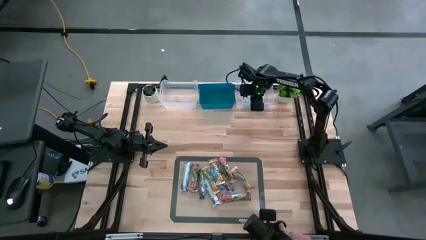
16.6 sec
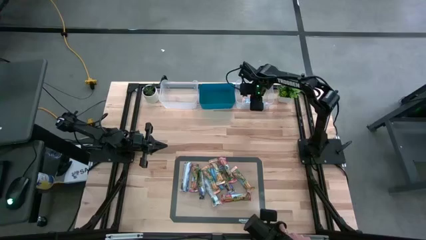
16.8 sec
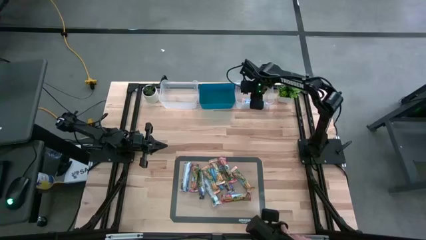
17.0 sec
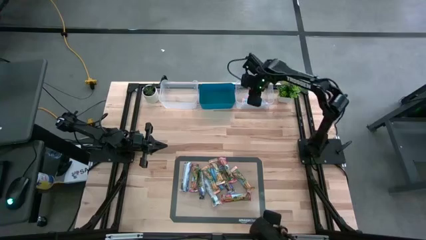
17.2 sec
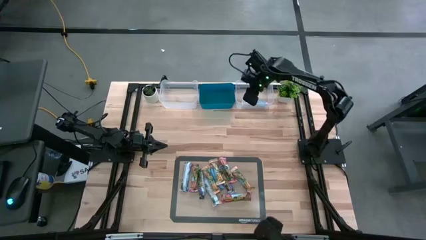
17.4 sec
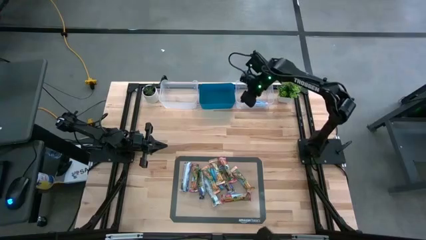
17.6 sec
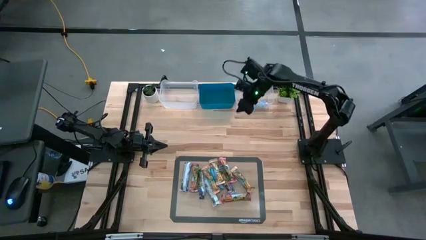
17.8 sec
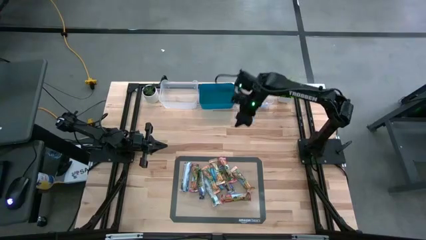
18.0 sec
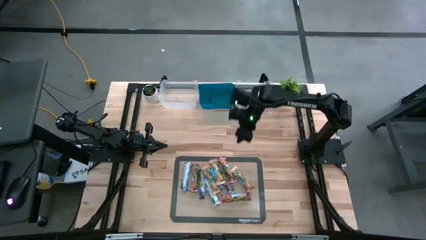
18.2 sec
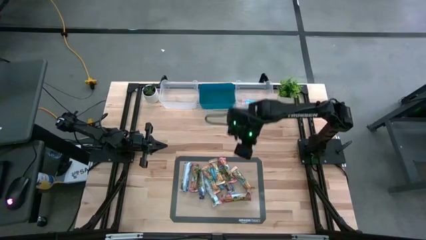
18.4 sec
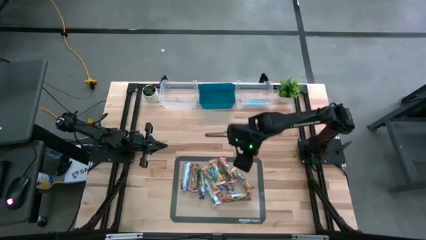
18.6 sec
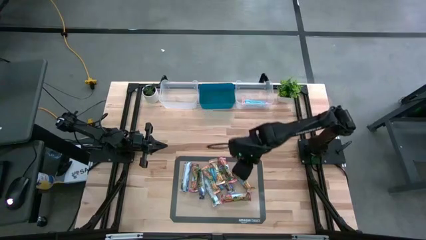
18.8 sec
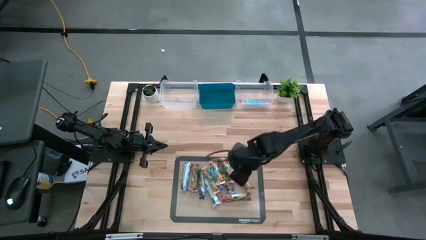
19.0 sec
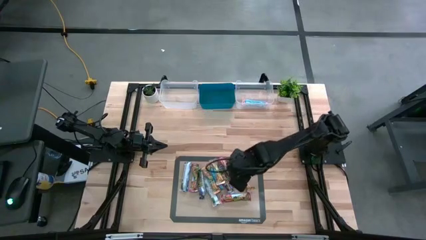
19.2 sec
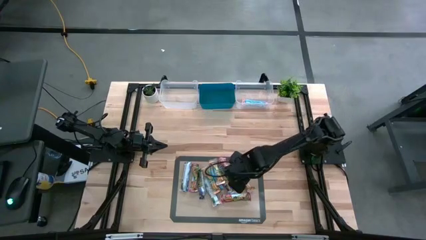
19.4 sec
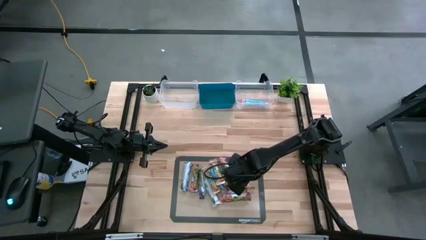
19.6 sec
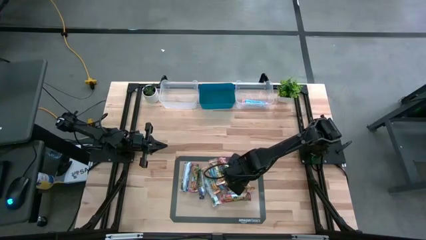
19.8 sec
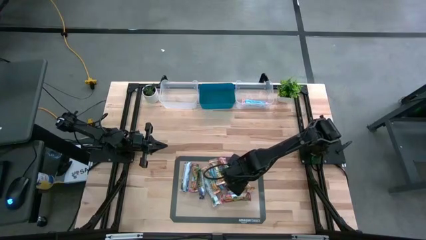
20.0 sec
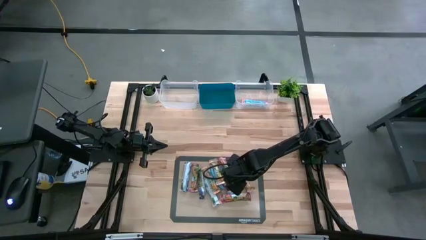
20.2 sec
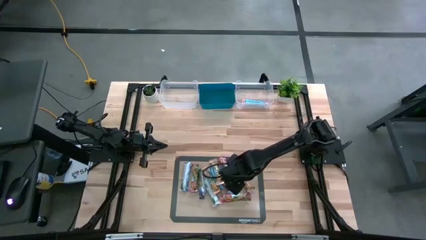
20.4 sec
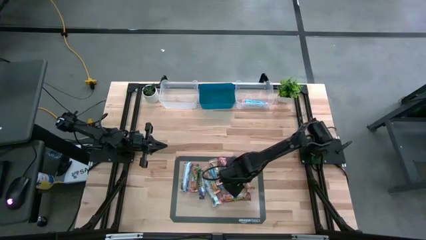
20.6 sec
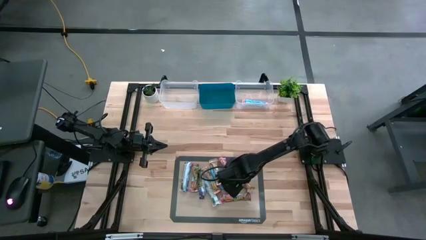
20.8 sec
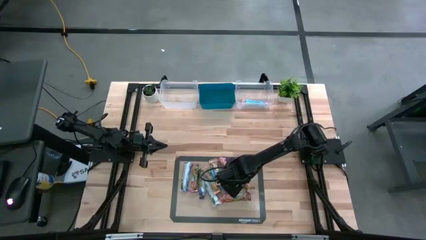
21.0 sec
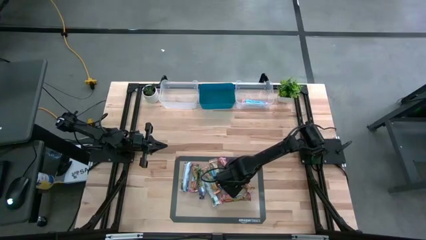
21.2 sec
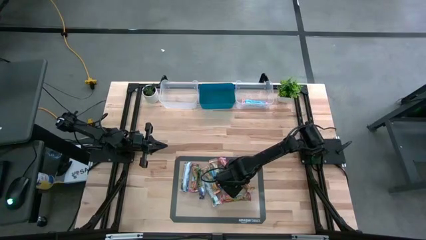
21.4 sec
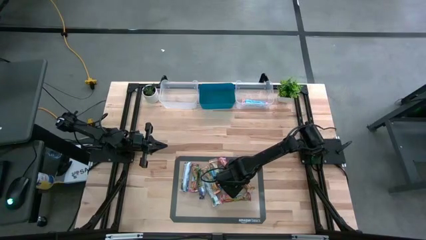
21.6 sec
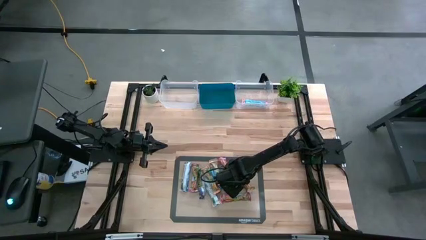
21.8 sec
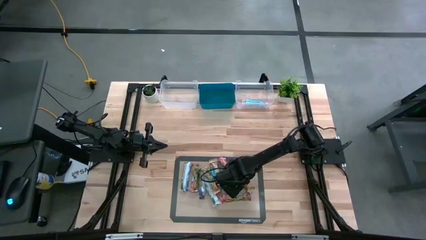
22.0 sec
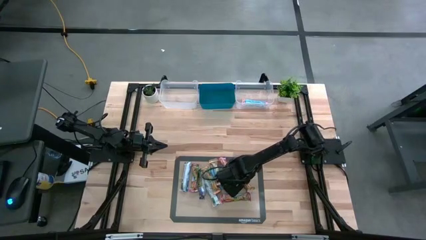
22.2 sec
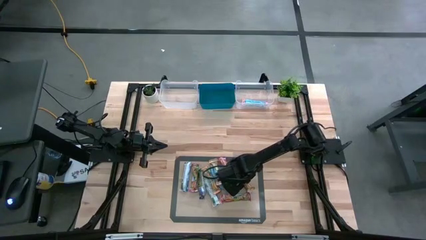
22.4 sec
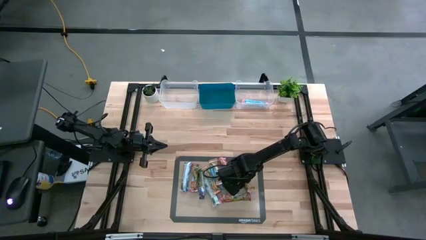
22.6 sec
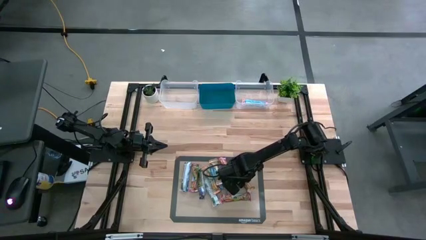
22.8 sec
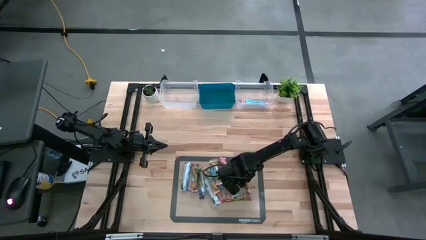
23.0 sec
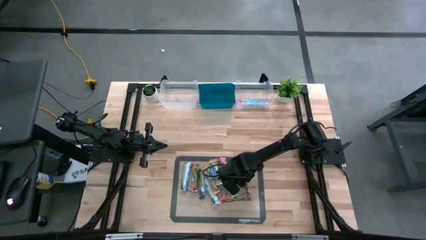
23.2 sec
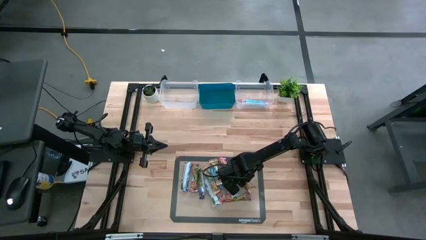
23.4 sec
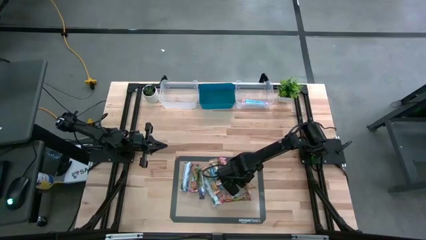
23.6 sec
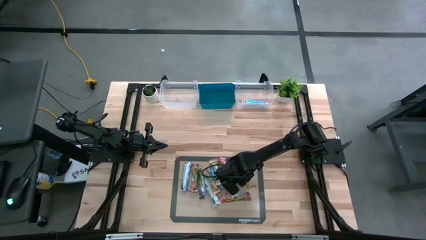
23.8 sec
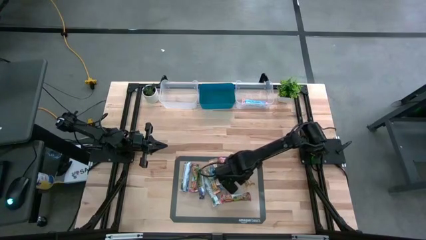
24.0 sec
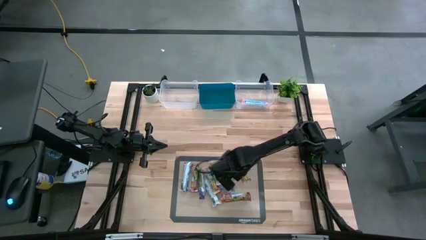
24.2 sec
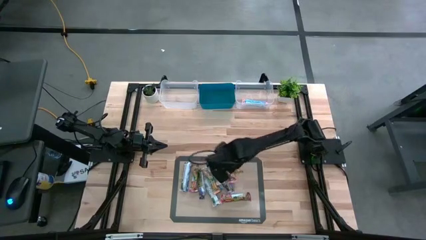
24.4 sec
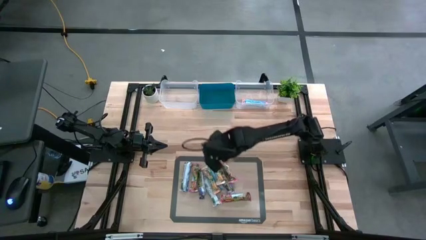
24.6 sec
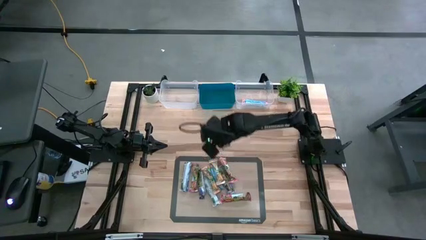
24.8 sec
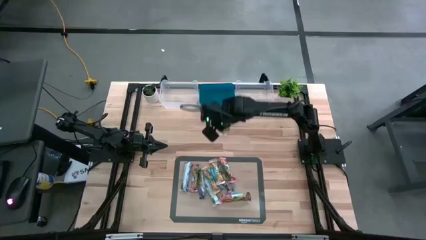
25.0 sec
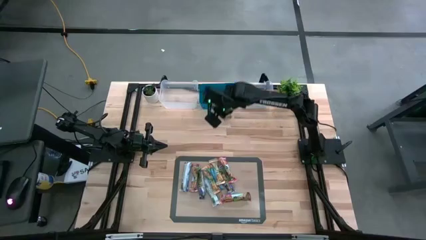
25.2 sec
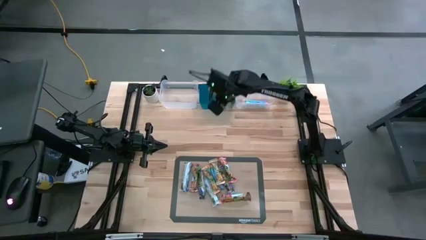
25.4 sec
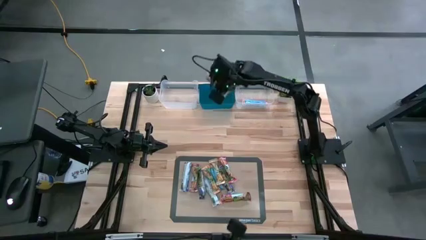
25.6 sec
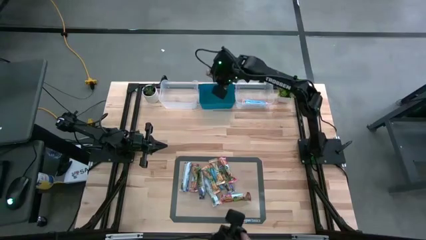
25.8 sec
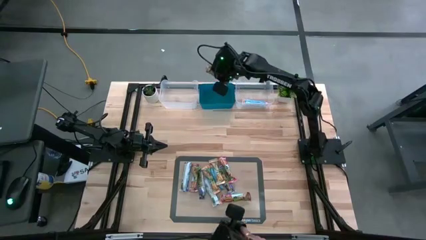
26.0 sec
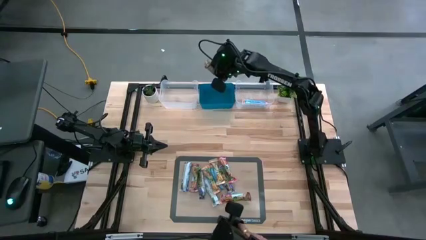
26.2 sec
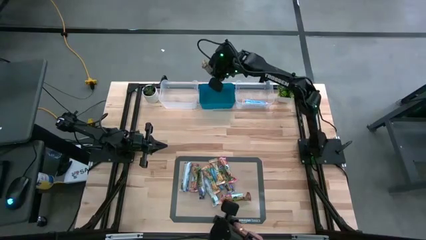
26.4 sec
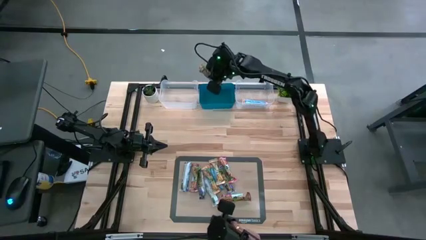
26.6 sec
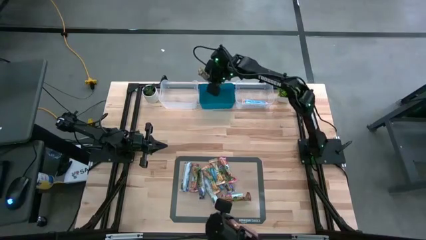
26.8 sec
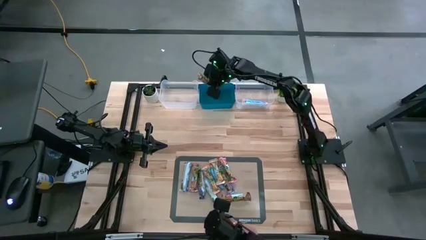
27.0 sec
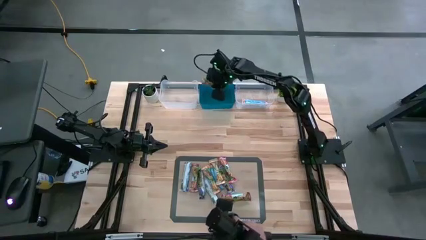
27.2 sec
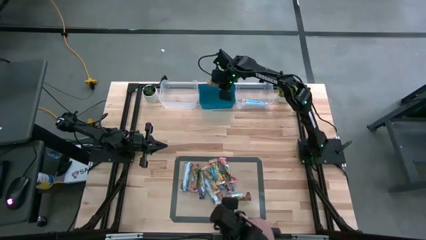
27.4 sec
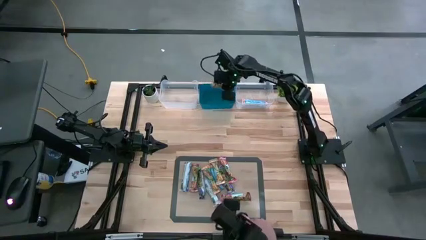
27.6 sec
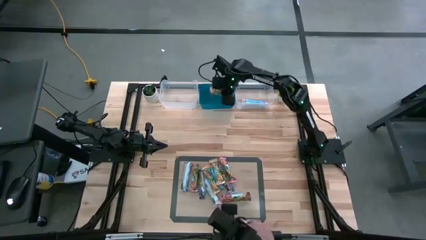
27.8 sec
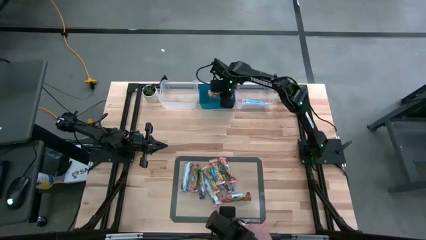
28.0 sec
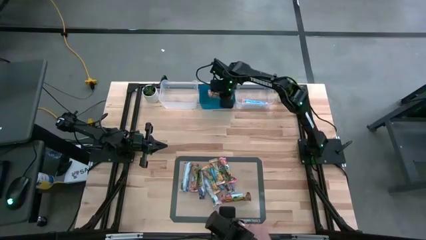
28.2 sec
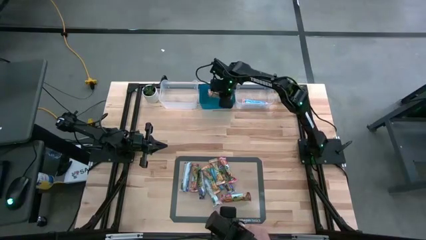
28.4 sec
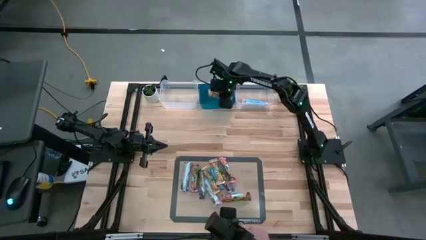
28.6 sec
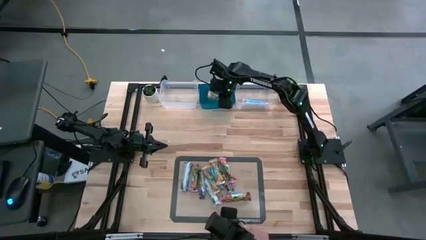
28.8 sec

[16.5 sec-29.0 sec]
Task: Pick and place Granola Bars by type
Put the yellow granola bar into the blue bin

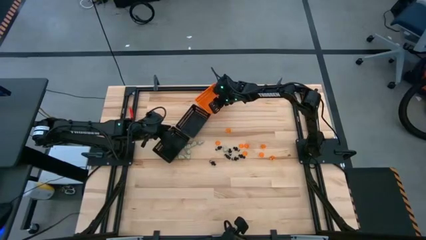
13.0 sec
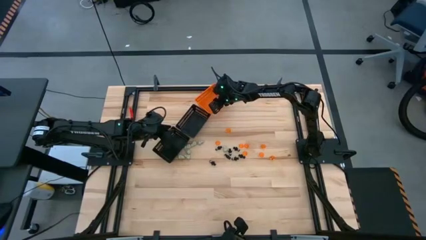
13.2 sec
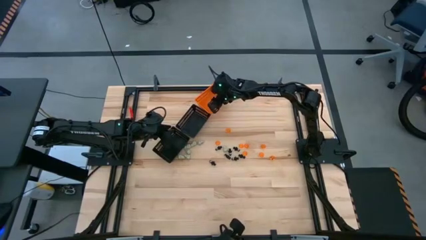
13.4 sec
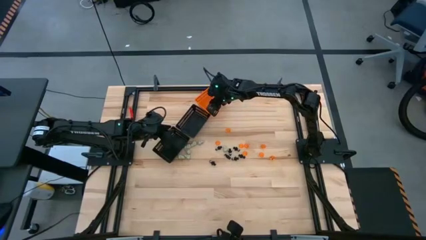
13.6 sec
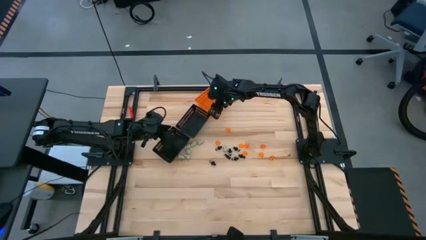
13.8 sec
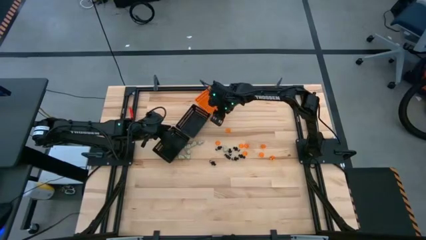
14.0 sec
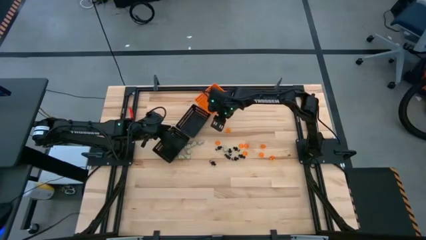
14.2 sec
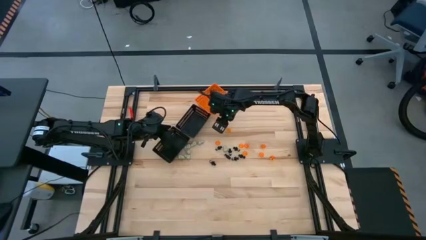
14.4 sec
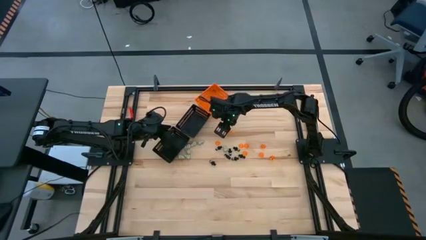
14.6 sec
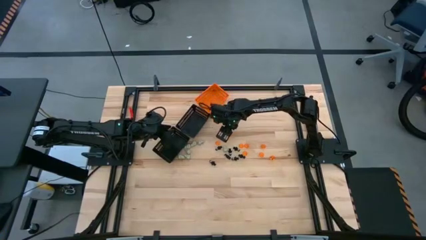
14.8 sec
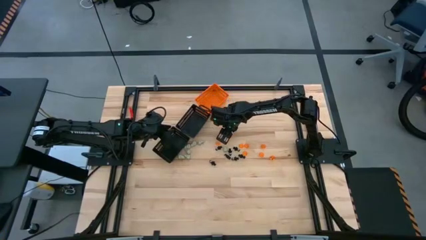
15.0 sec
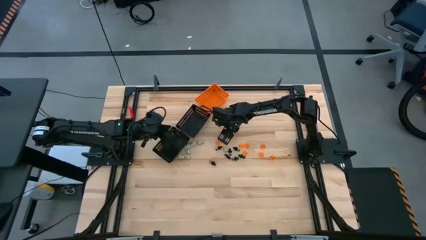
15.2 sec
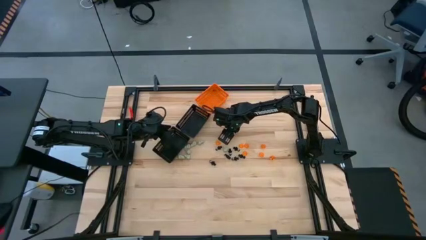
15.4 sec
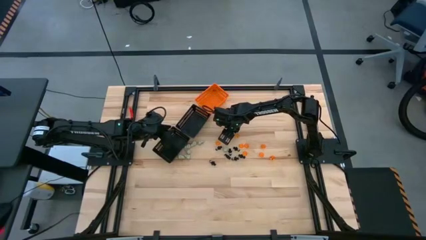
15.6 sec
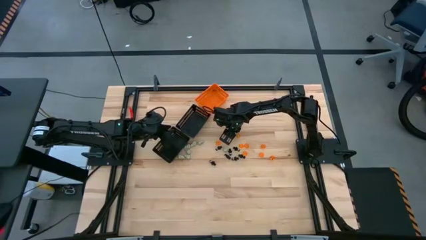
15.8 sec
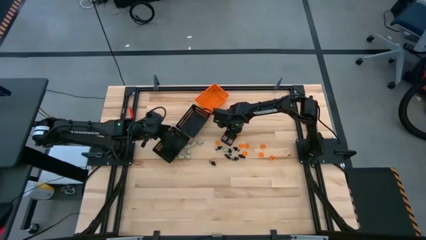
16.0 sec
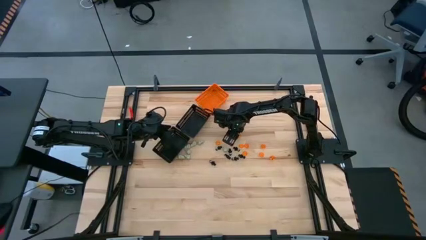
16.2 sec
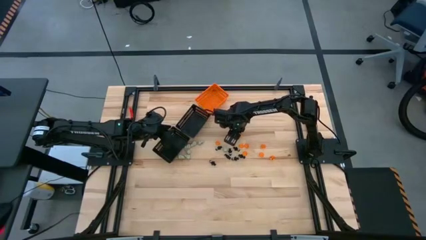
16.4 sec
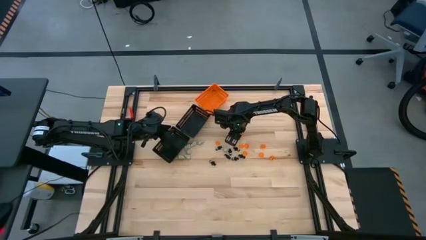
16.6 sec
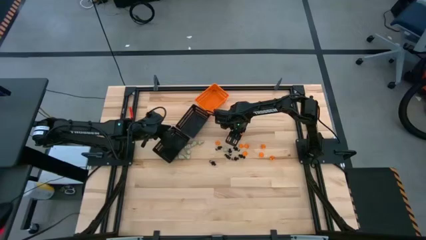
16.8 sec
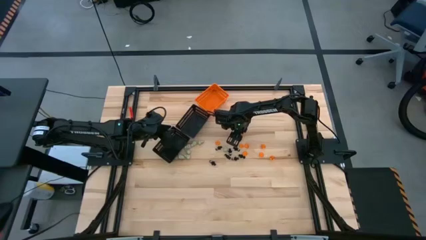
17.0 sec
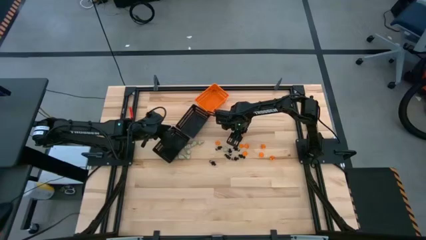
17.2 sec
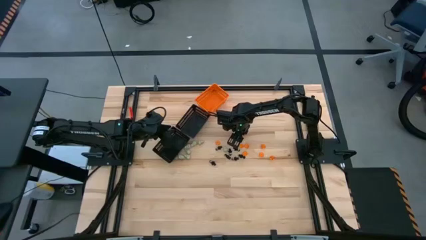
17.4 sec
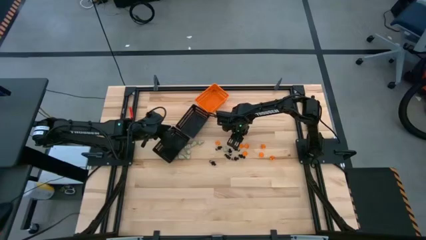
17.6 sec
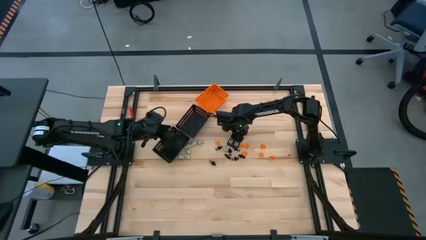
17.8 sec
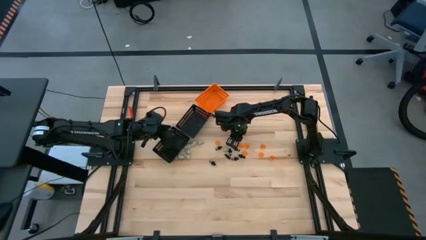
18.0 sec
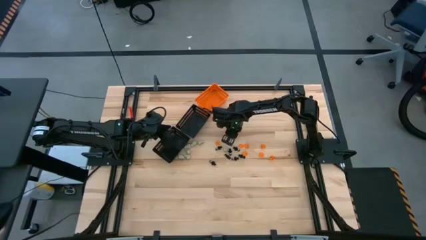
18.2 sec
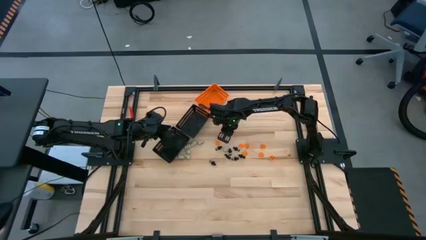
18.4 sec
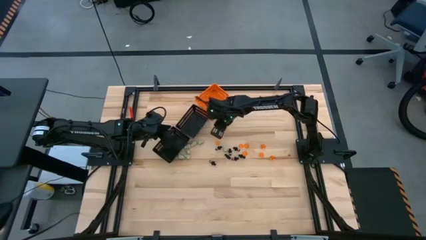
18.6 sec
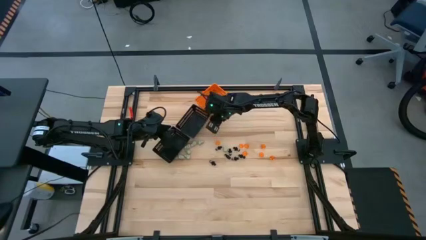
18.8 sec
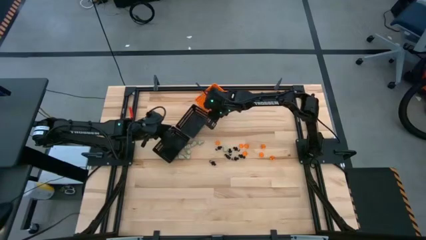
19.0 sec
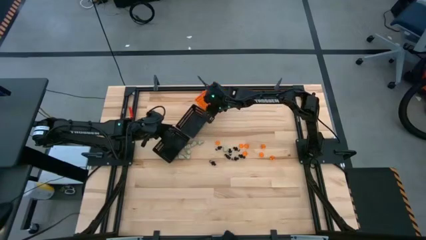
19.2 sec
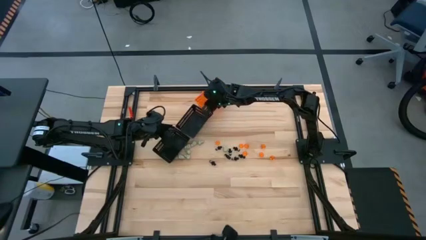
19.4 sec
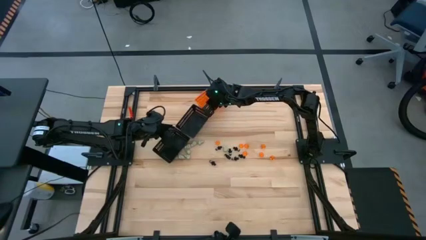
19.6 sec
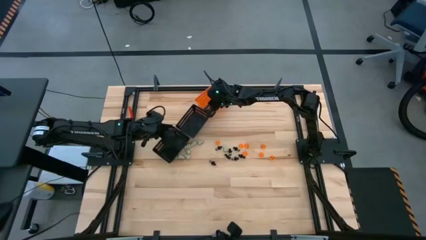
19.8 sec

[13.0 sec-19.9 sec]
Task: Sort Halloween decoration
Put the orange pumpkin toy into the orange bin
